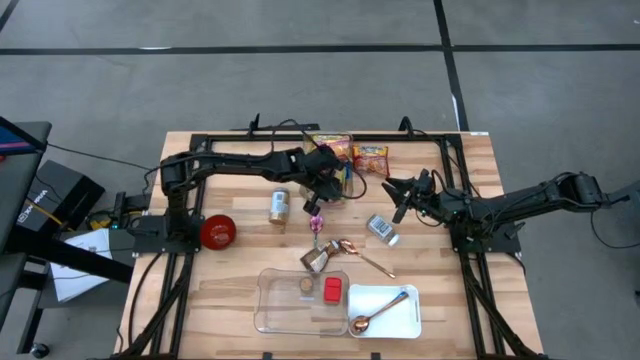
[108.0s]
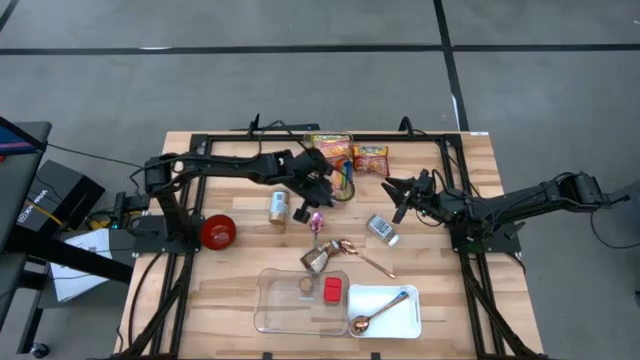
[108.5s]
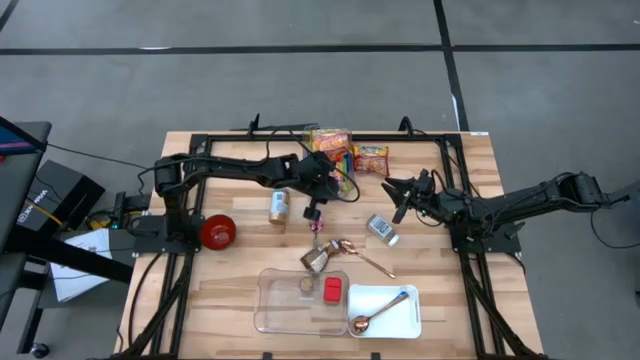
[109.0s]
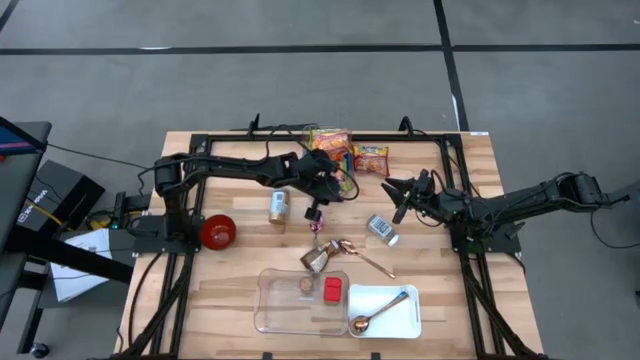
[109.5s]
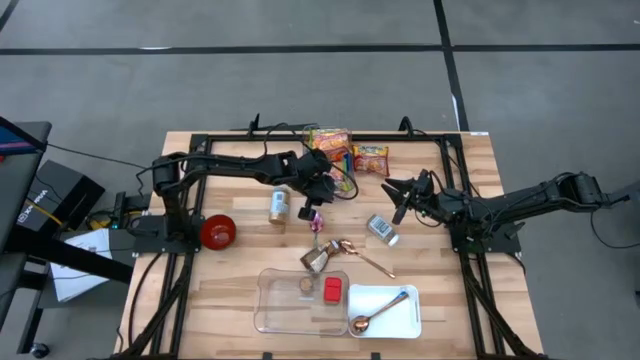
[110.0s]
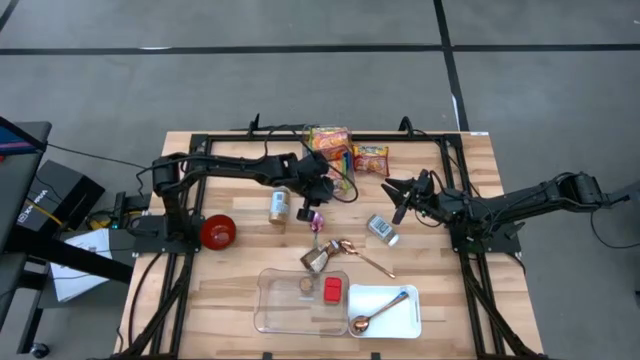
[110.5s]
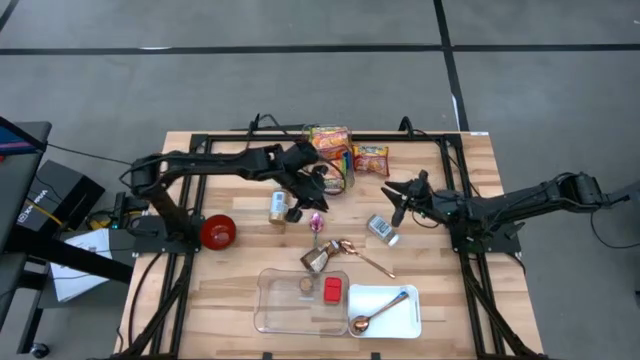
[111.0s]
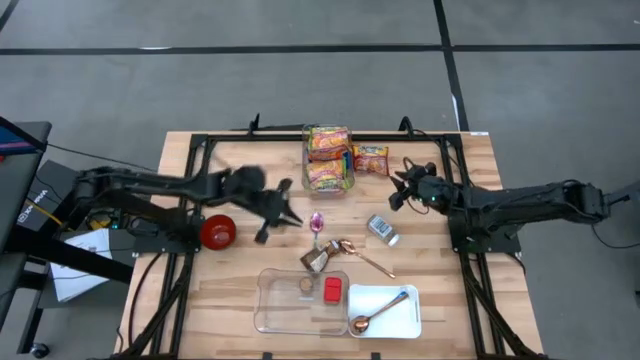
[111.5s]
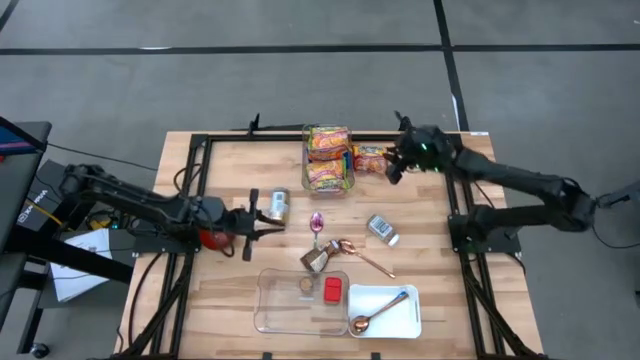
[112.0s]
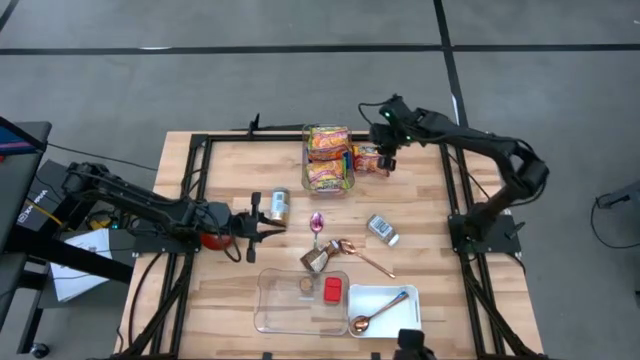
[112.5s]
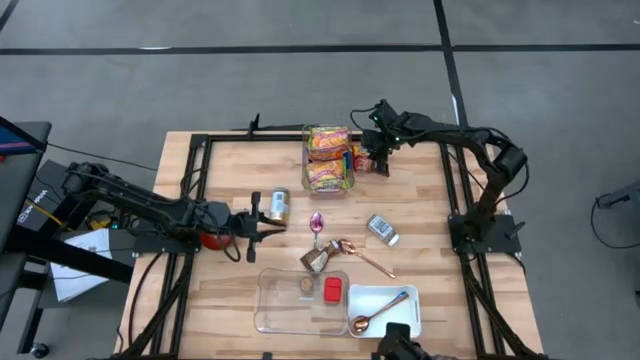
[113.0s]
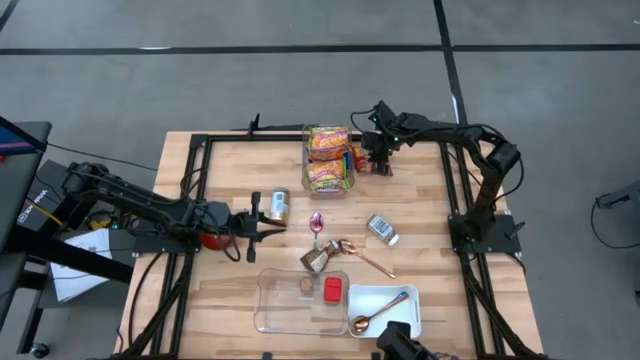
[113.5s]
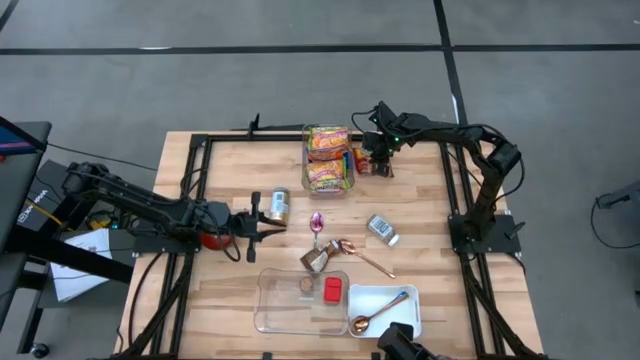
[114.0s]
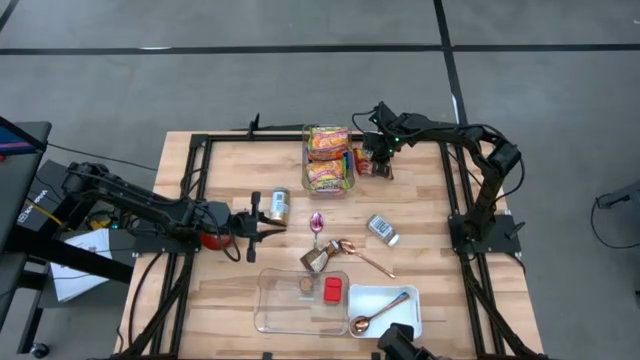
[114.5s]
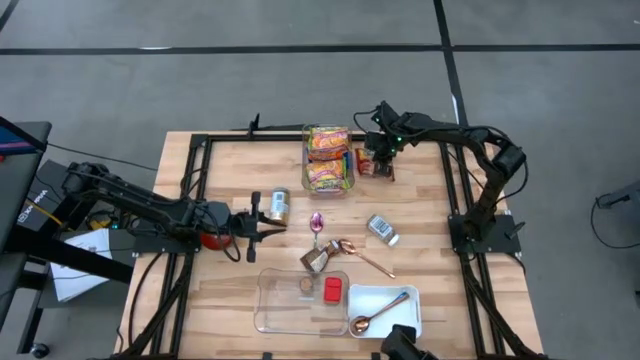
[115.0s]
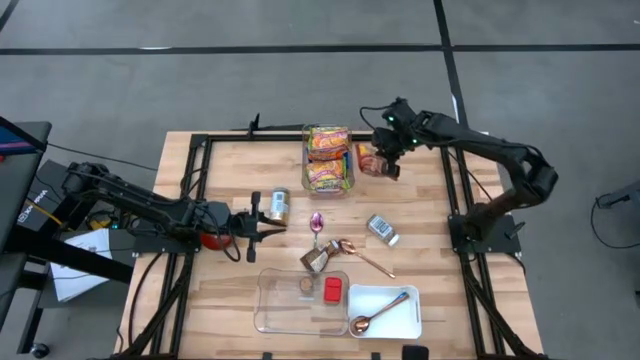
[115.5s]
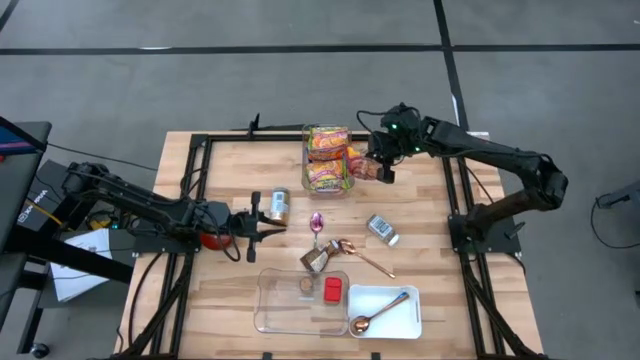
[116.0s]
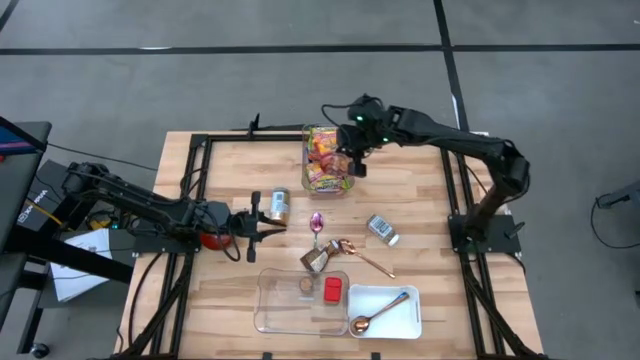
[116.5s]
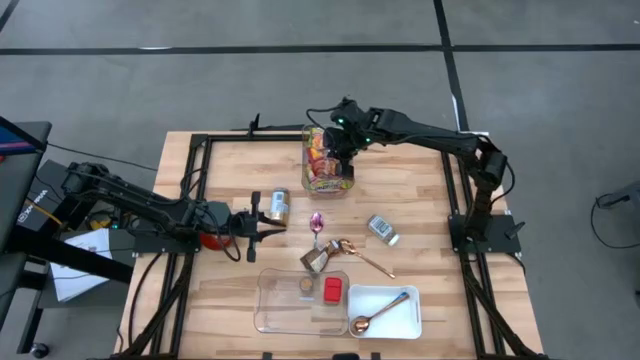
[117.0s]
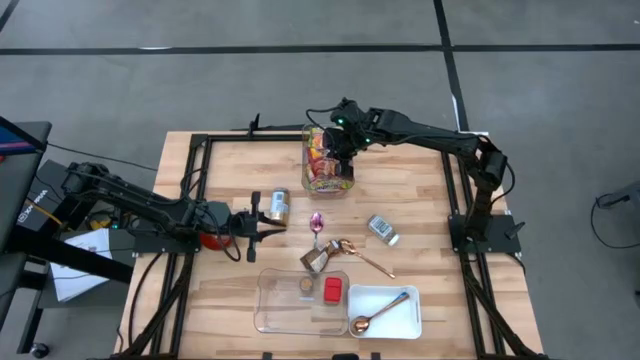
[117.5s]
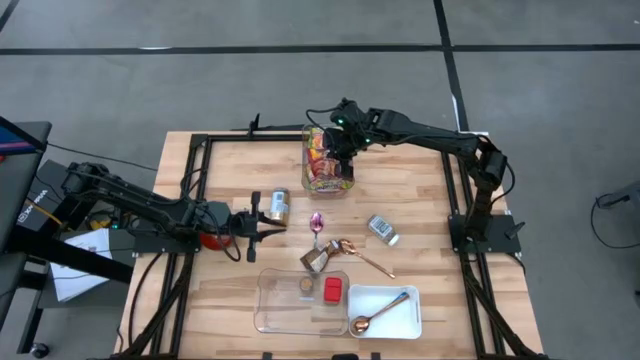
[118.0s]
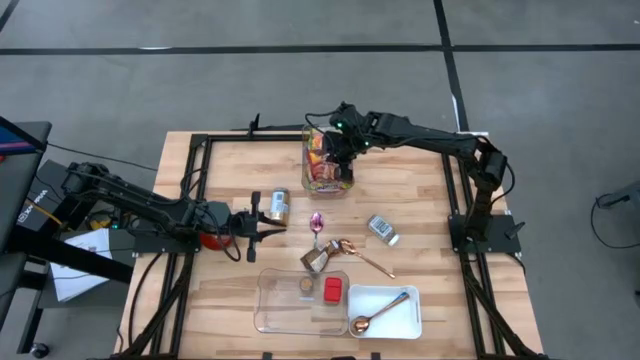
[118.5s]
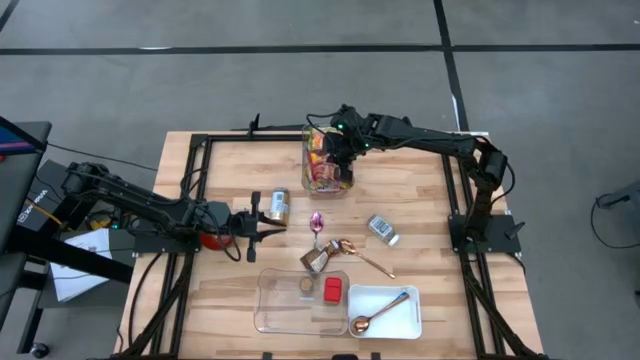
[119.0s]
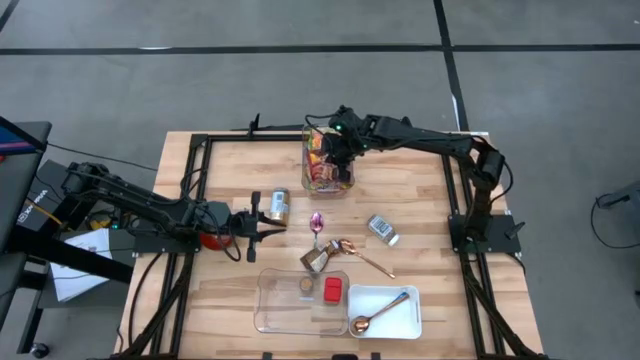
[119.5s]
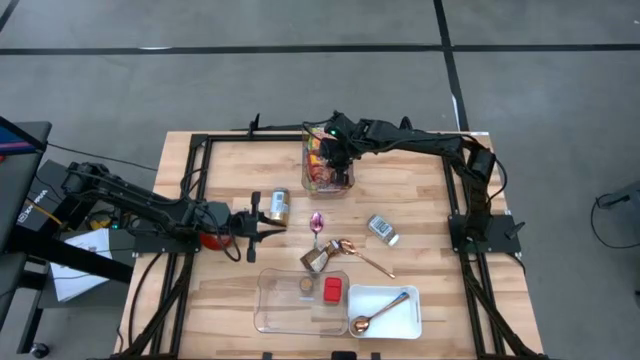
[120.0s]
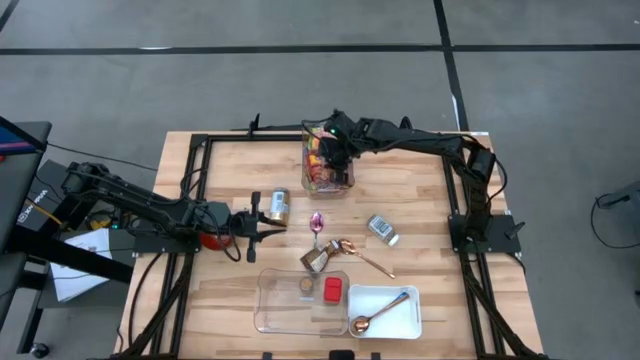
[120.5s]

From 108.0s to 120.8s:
Task: Pick & Place Food Item
Put the red noodle pack into the top transparent bin

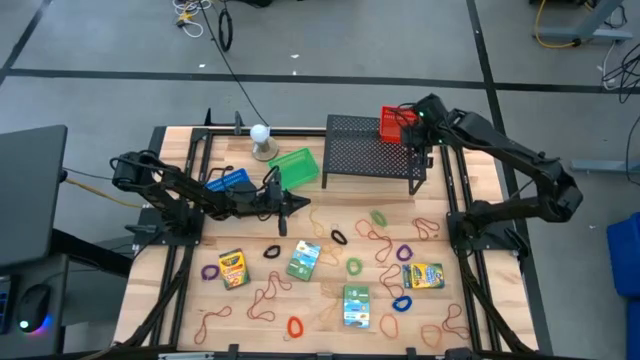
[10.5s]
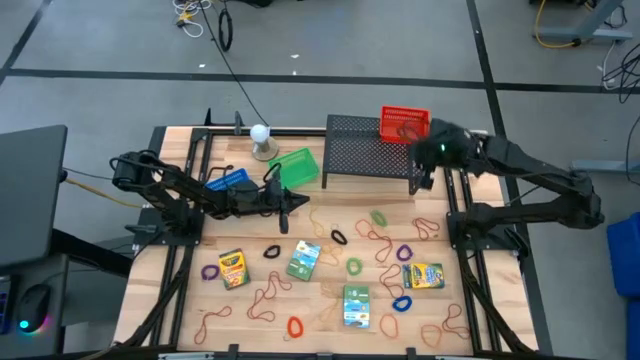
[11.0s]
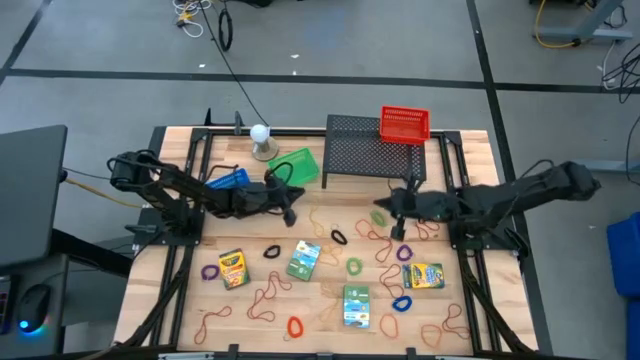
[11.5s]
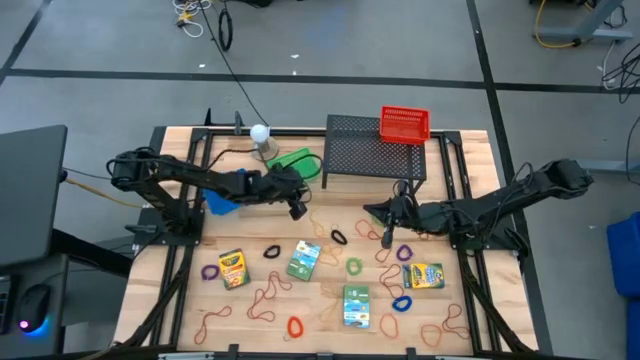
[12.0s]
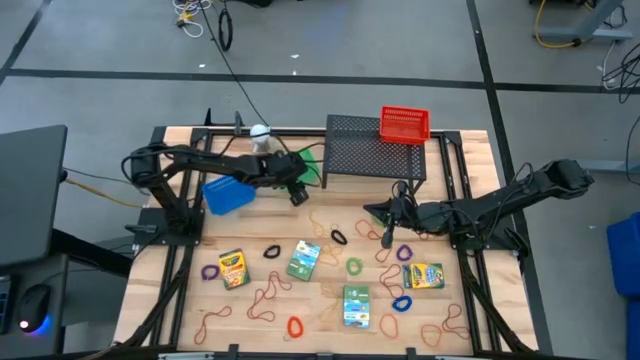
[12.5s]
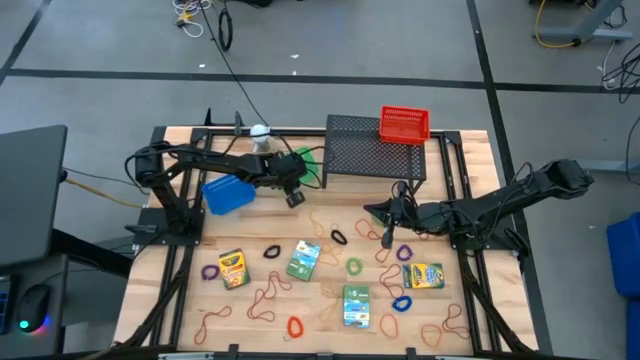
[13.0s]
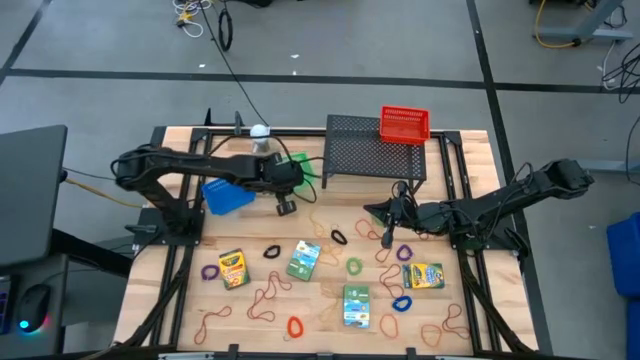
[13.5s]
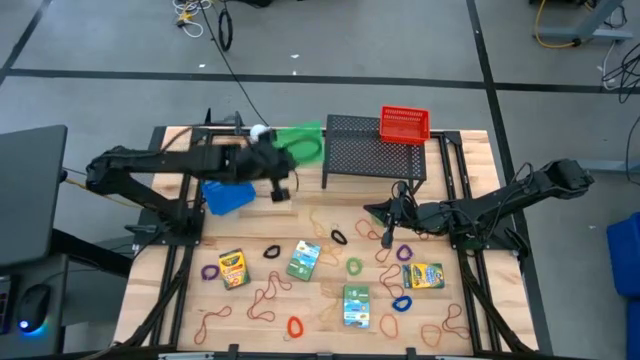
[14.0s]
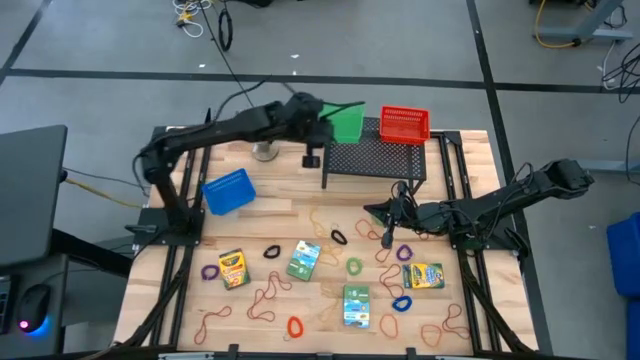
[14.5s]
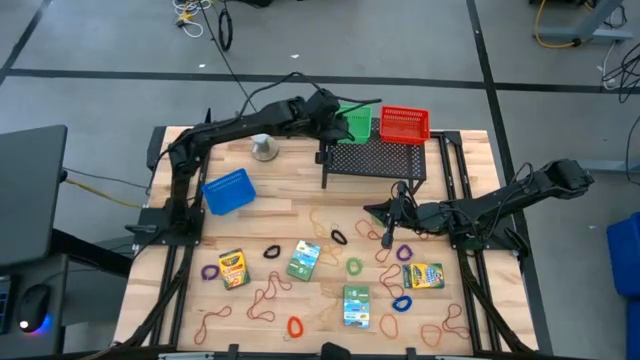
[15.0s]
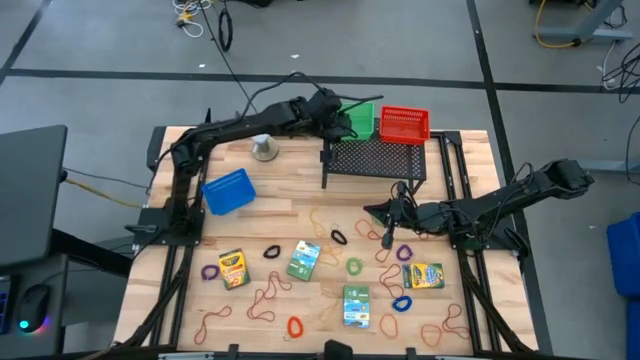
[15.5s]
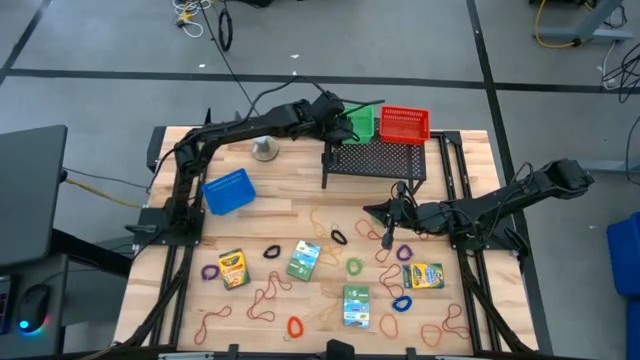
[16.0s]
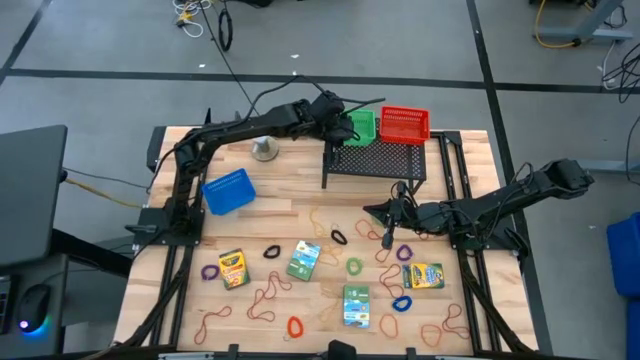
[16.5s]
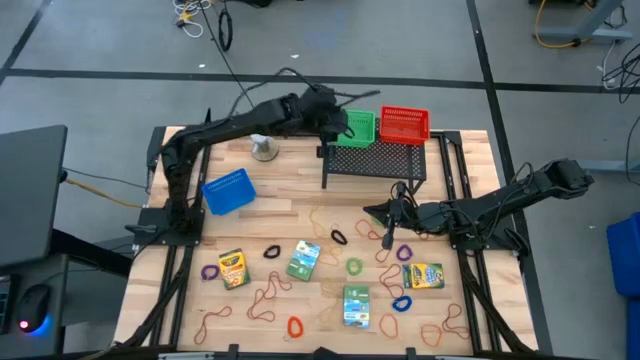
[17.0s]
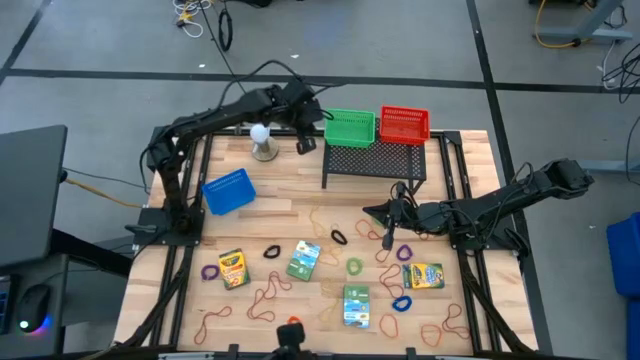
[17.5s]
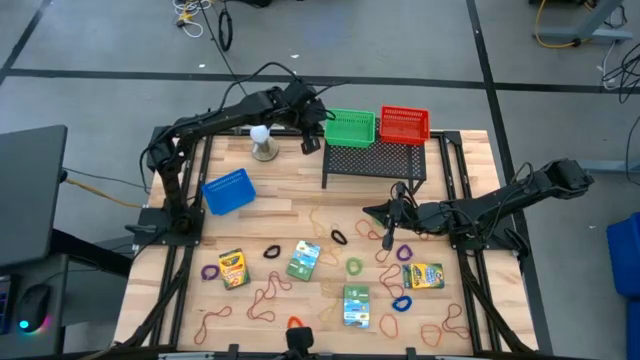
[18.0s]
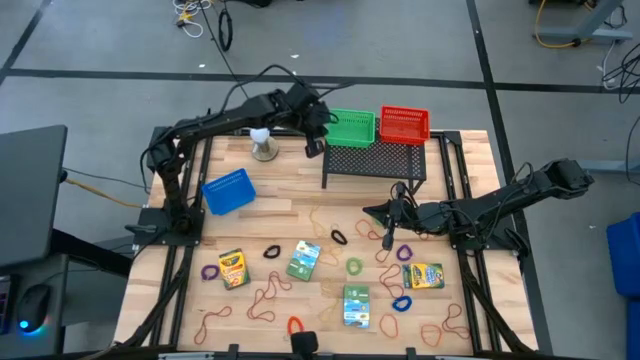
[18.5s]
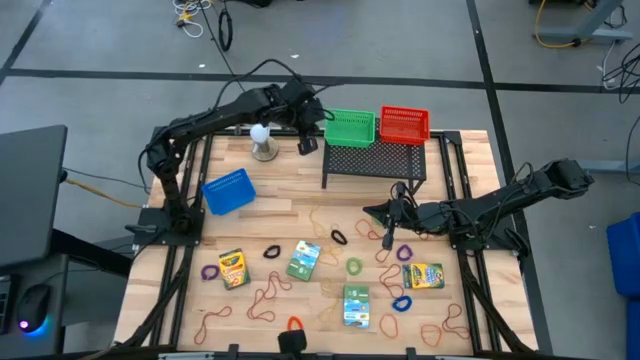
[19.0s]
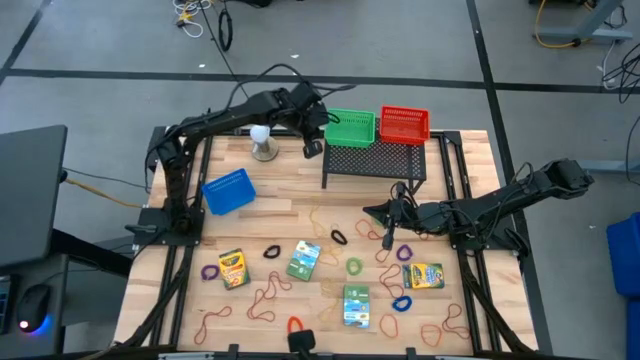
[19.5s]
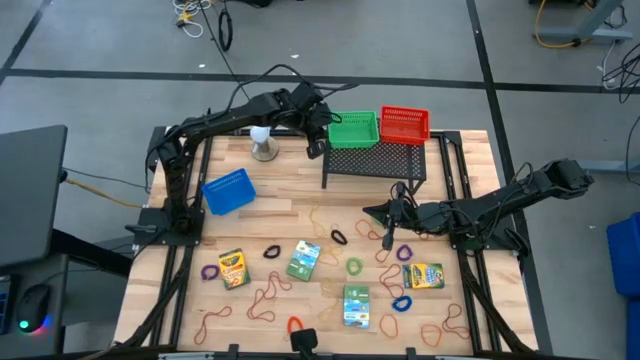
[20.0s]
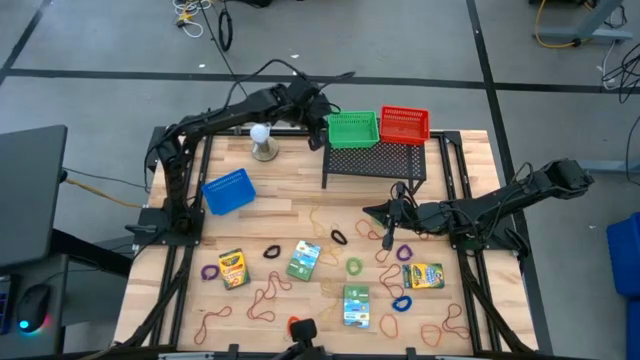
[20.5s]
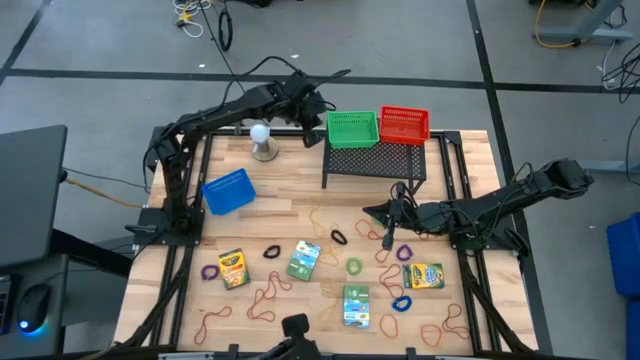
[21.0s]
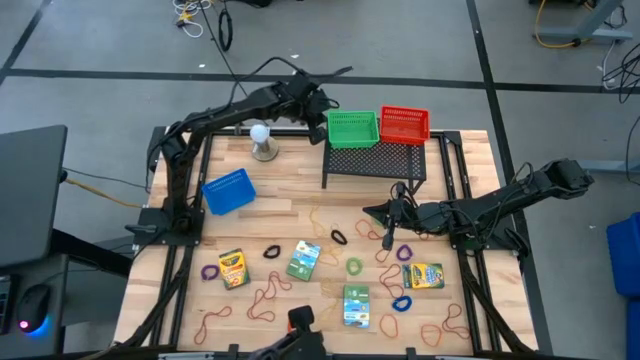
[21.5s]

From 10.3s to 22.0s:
Task: Pick & Place Office Desk Supplies
Put the green bin on the shelf
